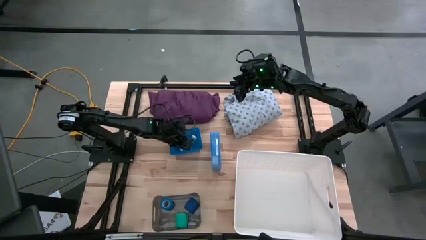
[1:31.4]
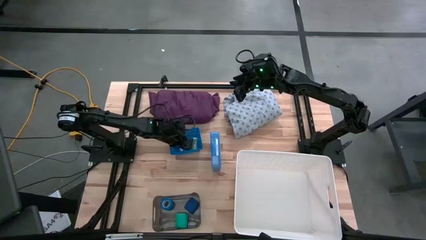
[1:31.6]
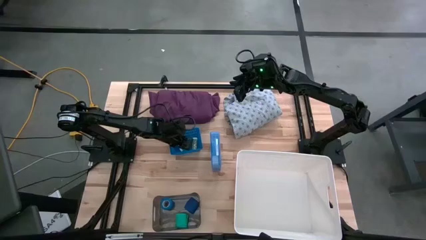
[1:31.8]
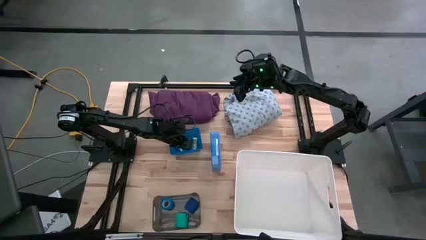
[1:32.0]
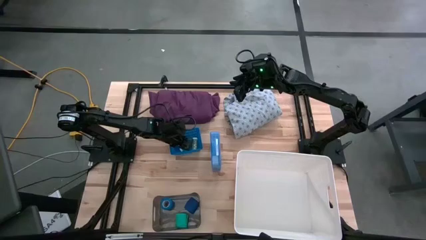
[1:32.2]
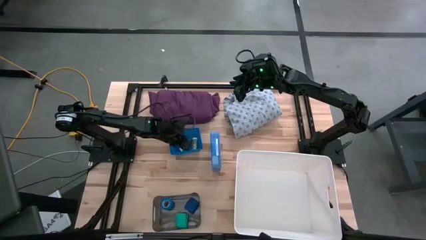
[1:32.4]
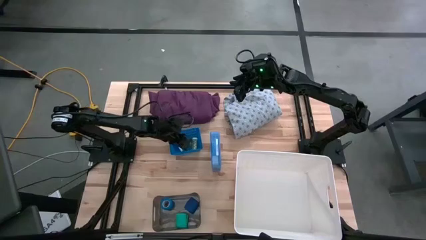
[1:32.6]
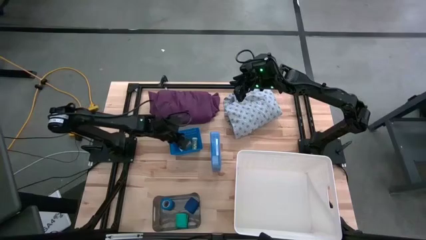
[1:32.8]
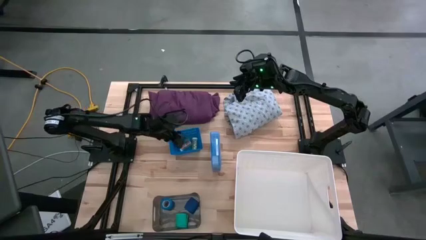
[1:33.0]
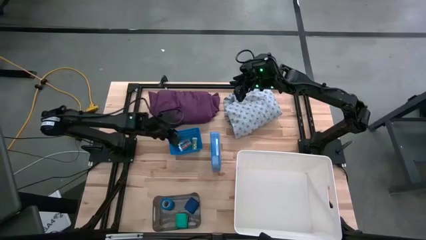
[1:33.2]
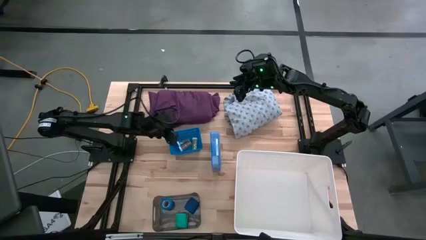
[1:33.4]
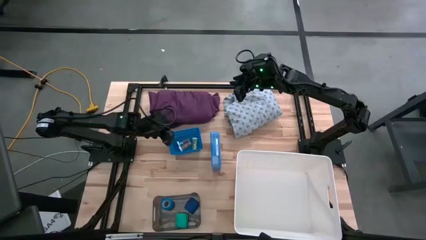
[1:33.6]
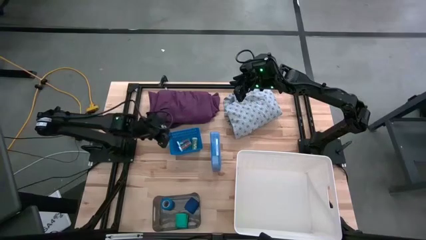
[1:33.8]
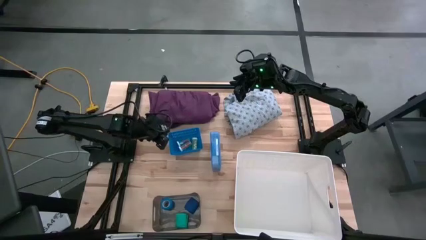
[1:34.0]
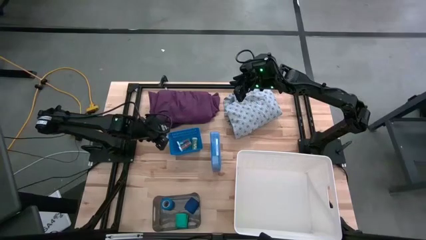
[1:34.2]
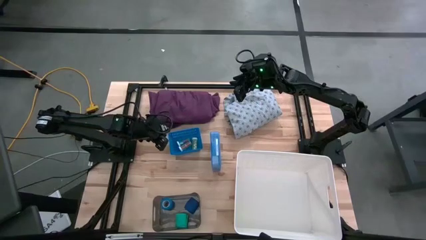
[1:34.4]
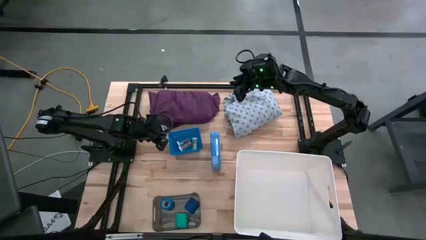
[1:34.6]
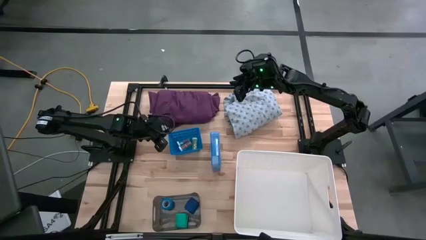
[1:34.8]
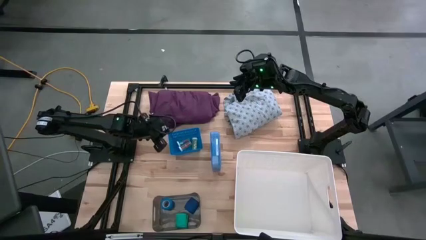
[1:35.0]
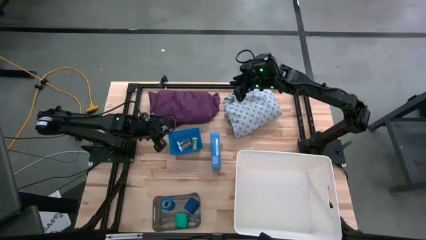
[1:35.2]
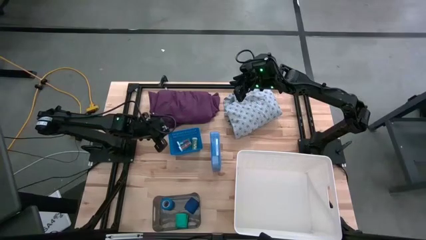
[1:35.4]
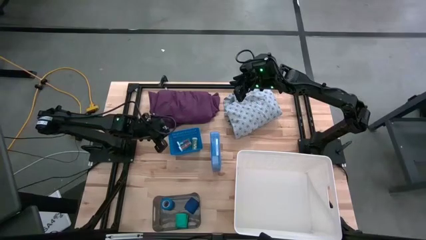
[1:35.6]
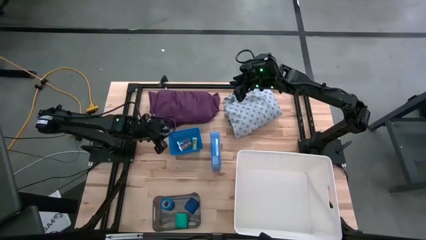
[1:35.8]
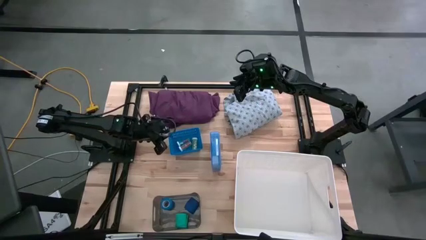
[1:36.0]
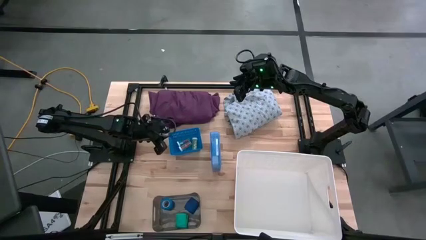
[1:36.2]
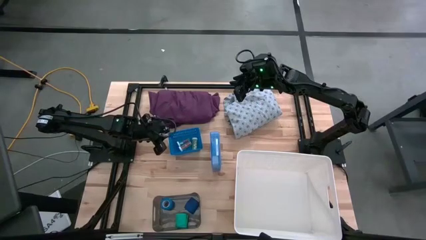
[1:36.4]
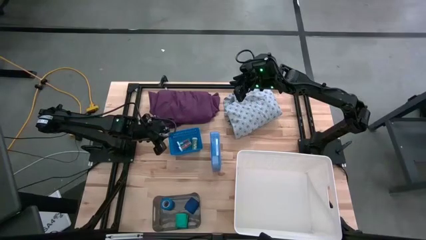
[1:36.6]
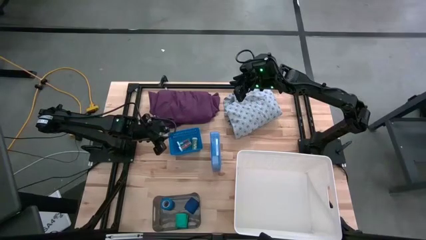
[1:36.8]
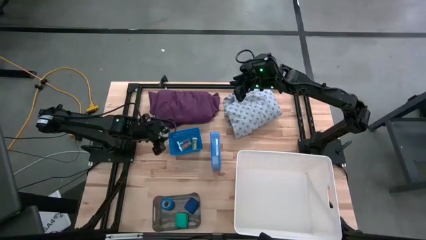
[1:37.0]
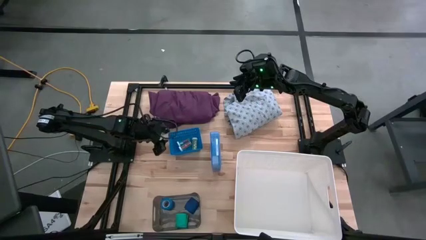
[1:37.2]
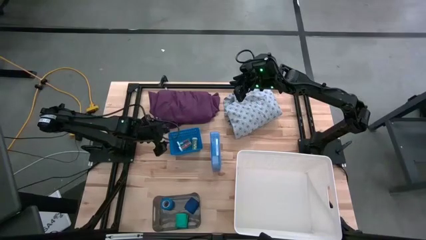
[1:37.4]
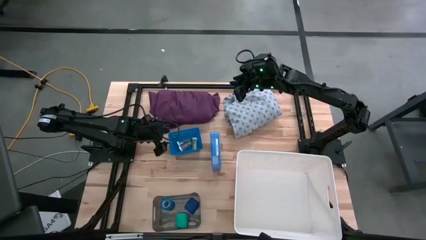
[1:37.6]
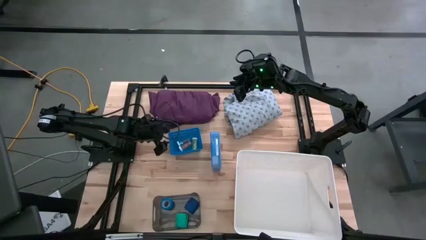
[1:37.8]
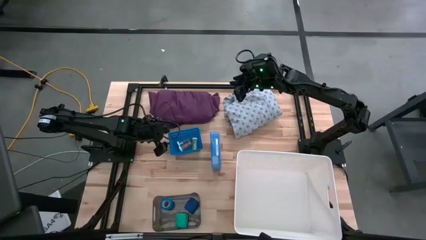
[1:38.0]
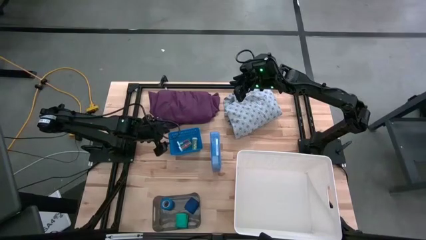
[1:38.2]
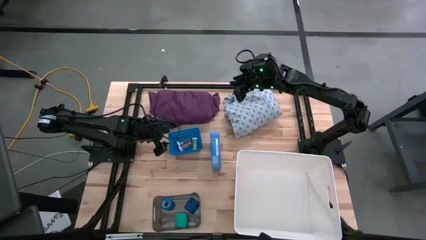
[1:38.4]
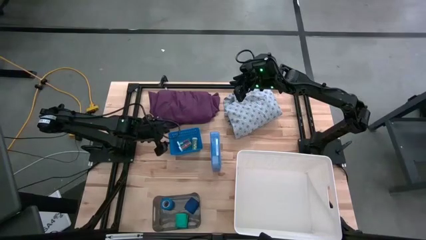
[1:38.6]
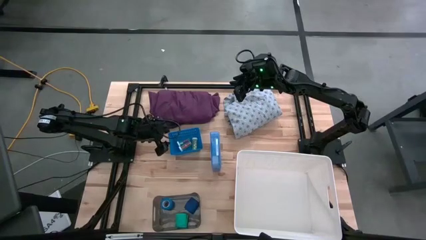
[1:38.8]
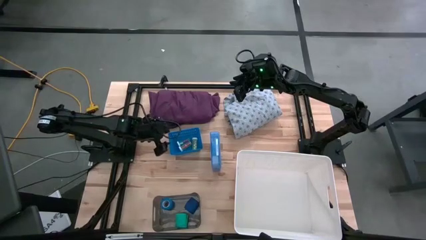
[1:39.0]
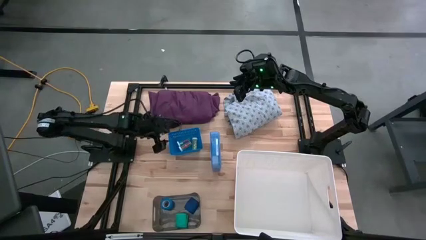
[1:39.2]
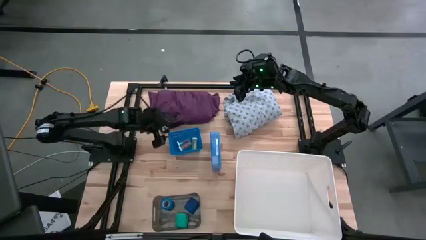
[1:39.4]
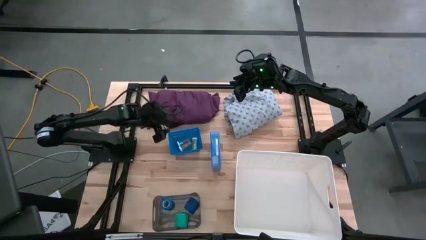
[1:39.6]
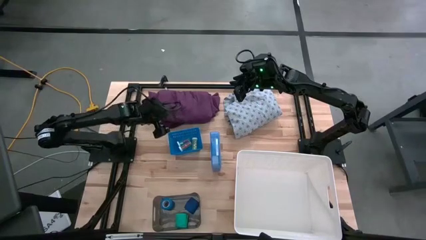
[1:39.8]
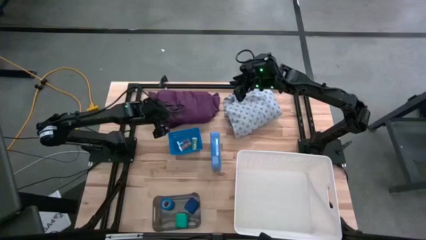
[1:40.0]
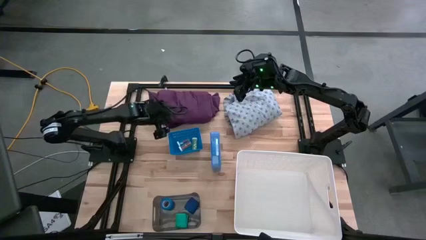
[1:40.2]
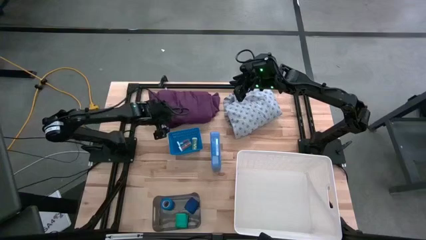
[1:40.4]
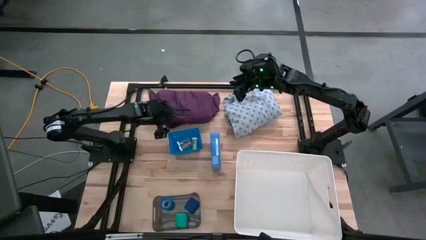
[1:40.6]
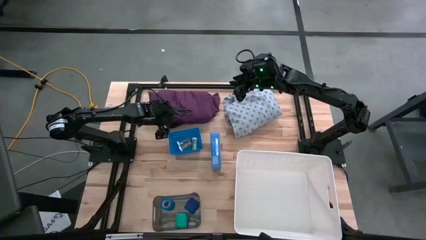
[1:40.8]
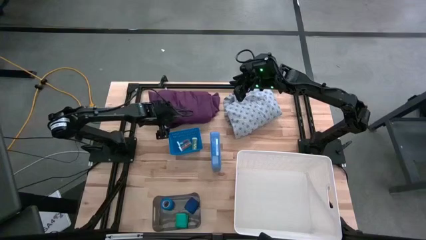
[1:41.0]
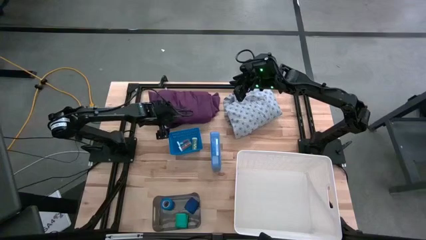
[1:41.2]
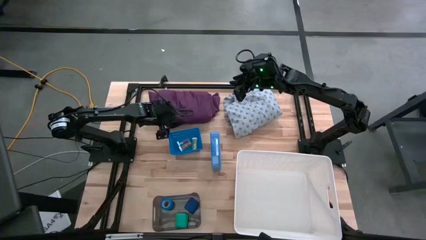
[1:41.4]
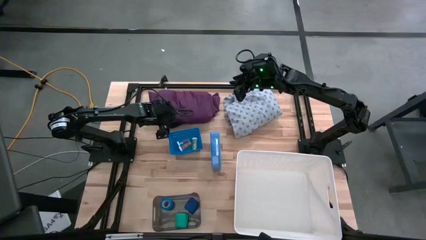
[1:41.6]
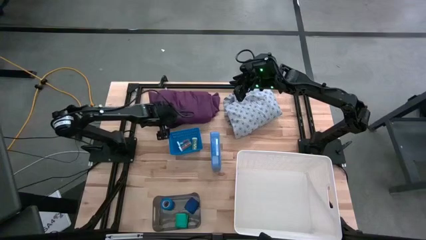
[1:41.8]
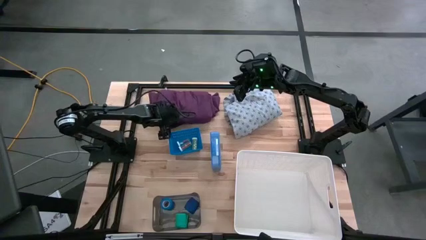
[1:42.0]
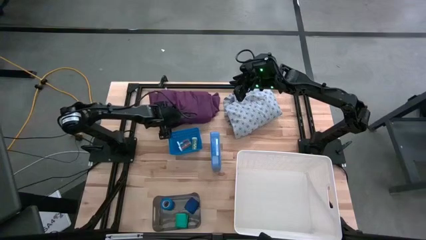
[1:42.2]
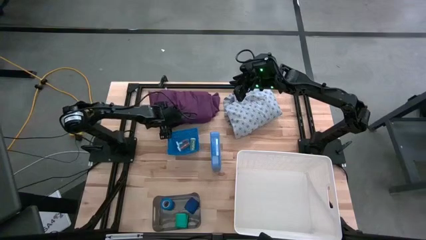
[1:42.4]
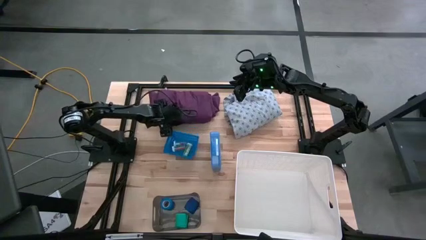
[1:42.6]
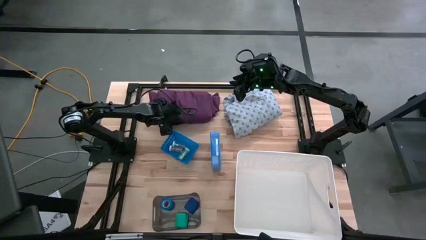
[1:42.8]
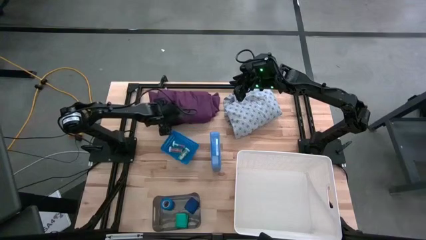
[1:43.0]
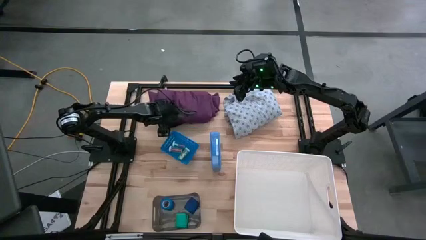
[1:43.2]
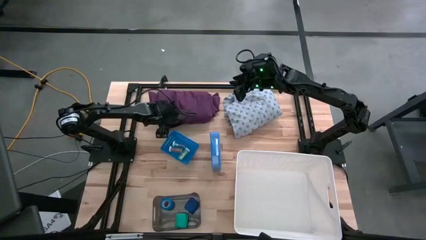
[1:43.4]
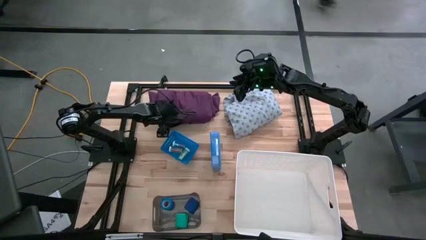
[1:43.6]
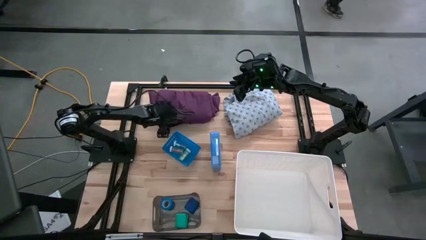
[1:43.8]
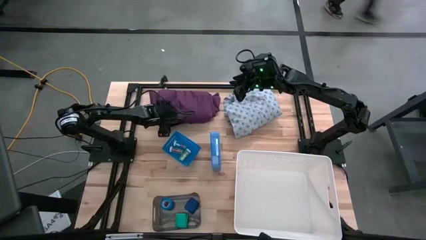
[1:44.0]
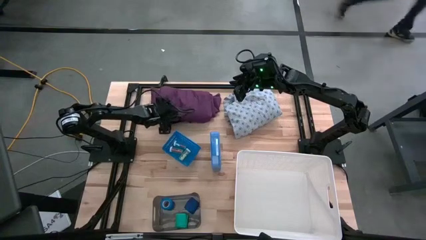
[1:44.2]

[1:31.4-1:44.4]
Task: Pick & Place Medicine items
Put the purple scrubs into the white bin
